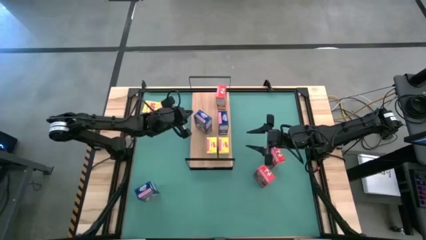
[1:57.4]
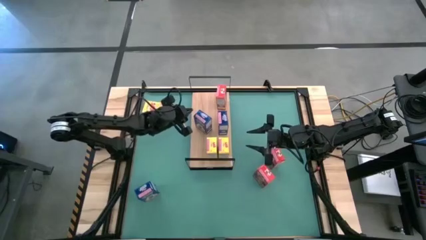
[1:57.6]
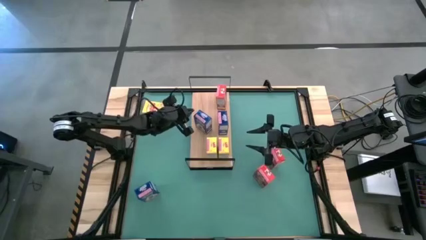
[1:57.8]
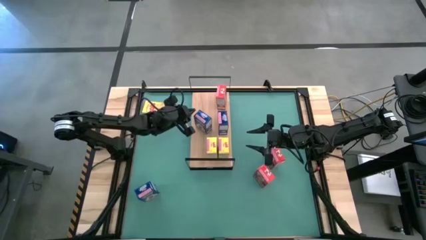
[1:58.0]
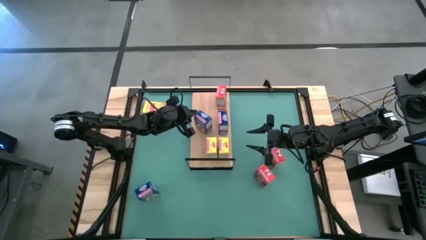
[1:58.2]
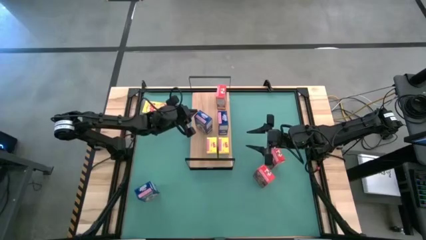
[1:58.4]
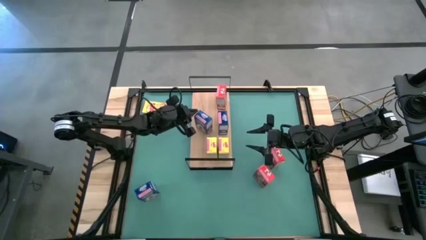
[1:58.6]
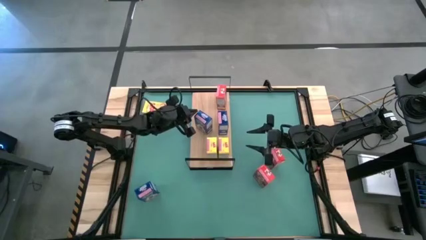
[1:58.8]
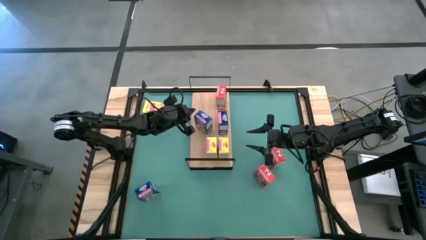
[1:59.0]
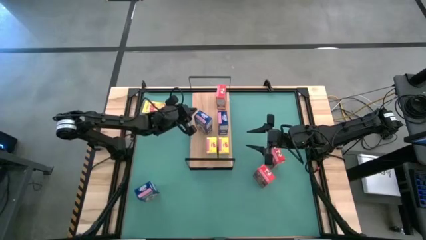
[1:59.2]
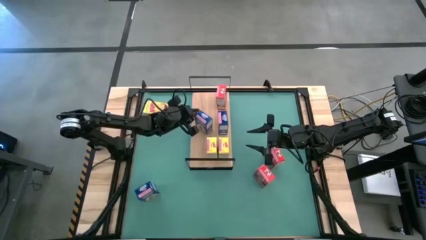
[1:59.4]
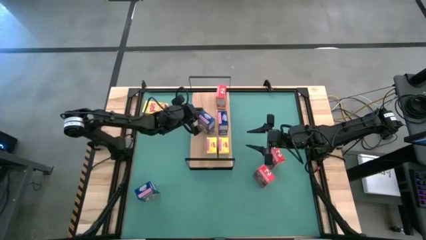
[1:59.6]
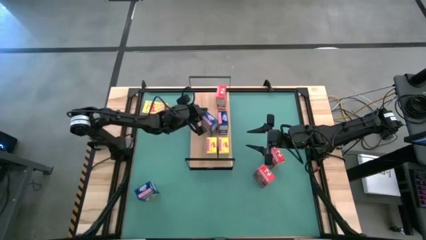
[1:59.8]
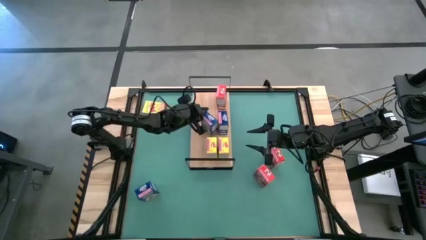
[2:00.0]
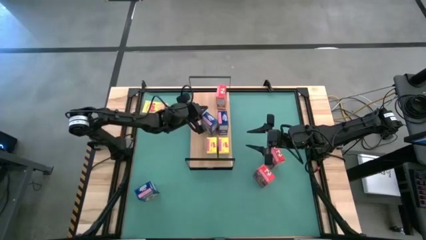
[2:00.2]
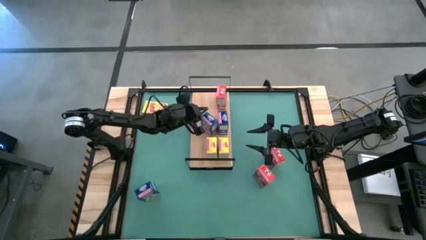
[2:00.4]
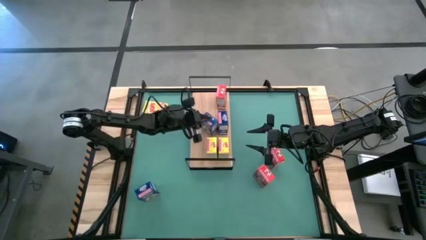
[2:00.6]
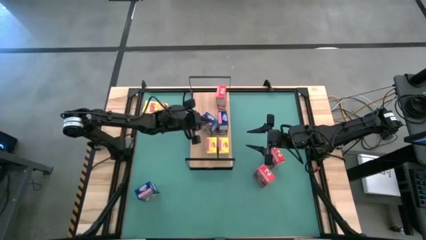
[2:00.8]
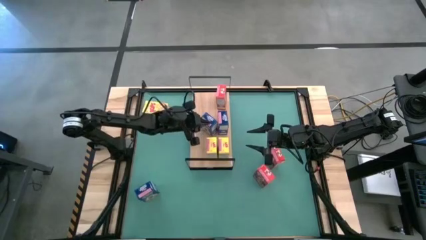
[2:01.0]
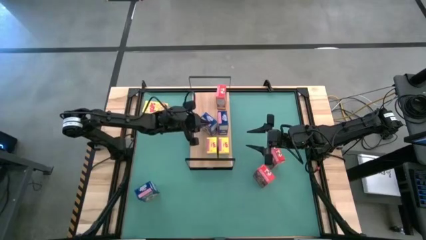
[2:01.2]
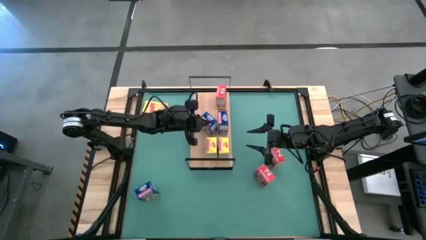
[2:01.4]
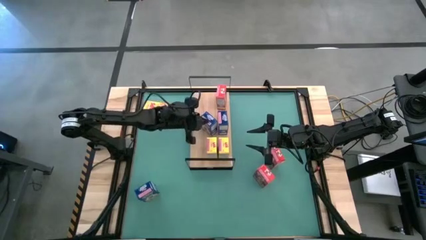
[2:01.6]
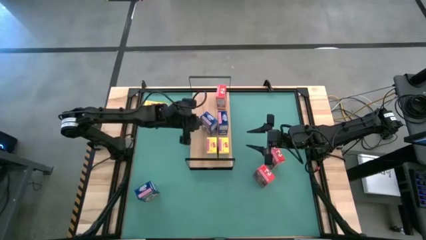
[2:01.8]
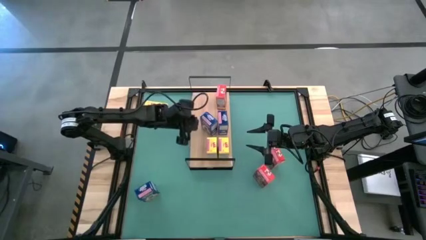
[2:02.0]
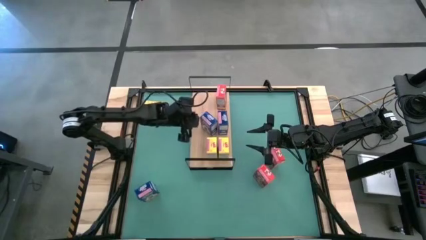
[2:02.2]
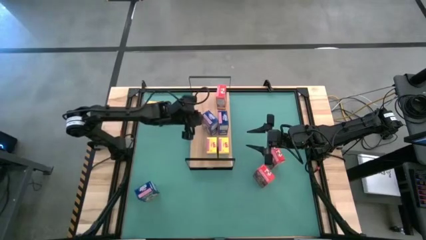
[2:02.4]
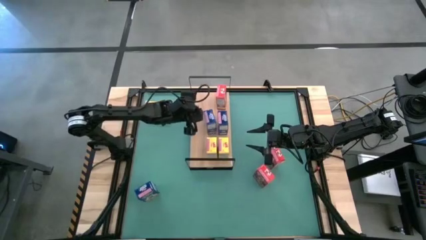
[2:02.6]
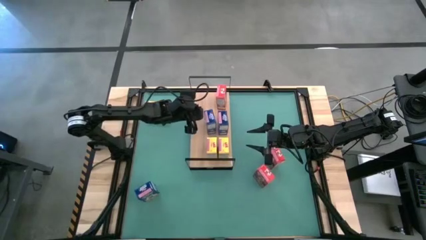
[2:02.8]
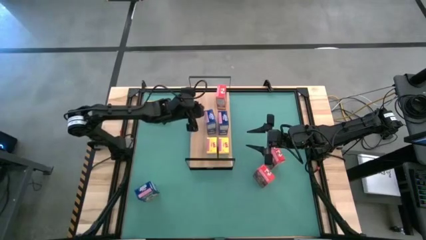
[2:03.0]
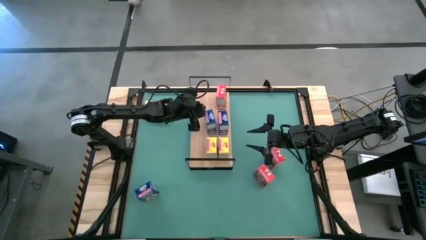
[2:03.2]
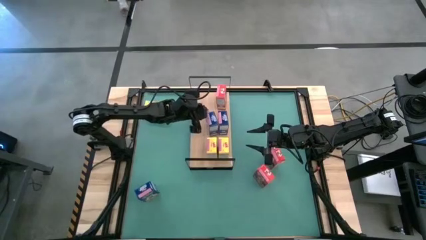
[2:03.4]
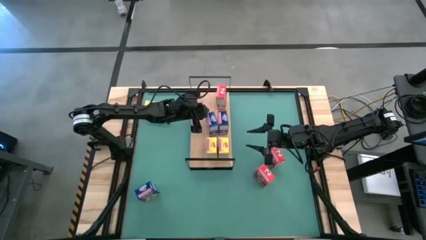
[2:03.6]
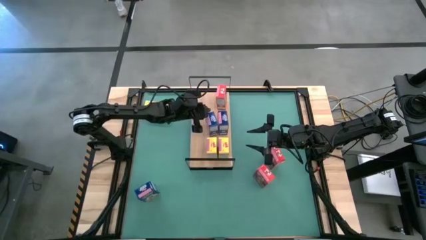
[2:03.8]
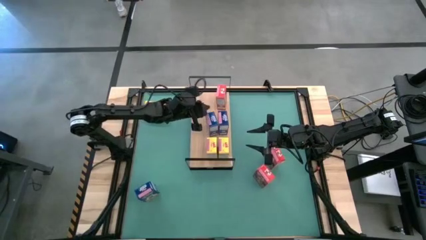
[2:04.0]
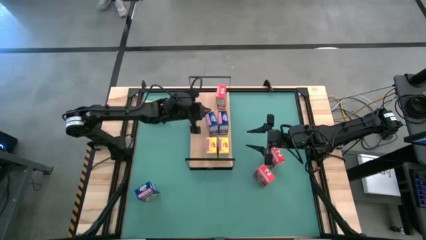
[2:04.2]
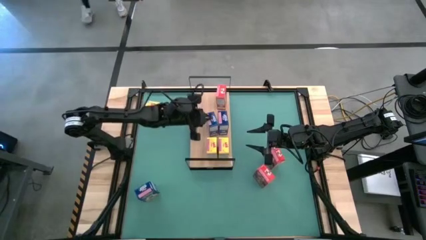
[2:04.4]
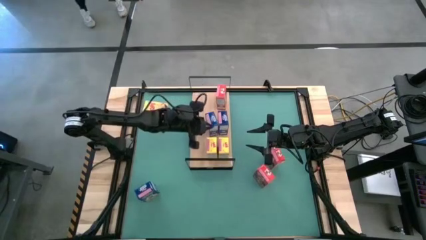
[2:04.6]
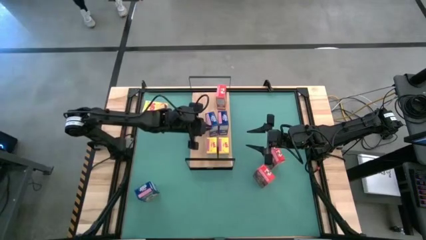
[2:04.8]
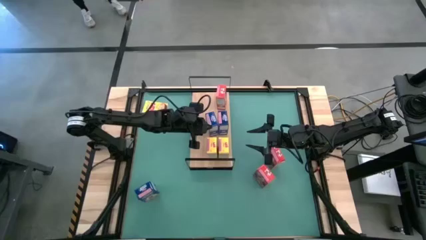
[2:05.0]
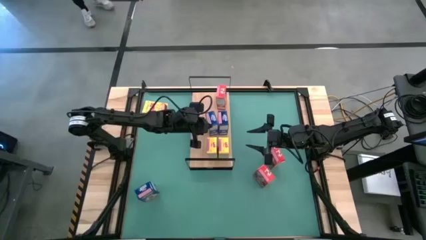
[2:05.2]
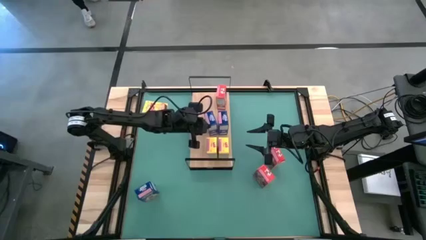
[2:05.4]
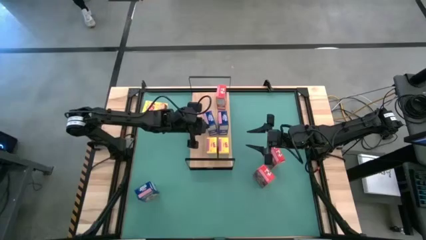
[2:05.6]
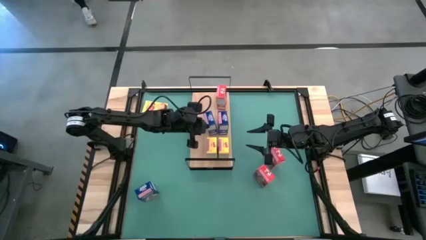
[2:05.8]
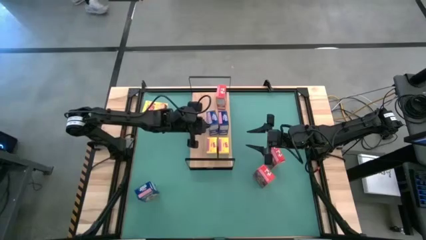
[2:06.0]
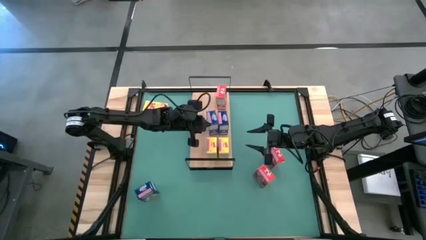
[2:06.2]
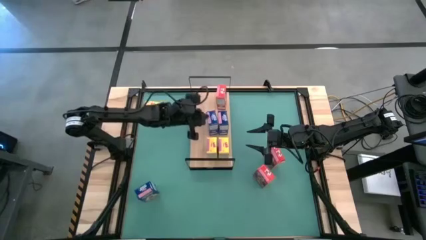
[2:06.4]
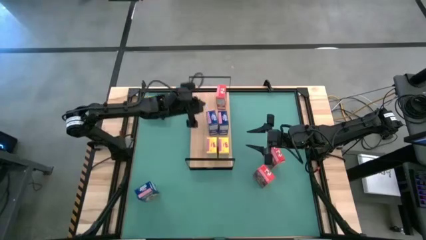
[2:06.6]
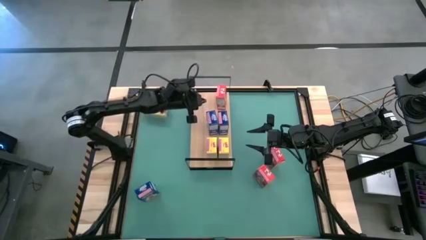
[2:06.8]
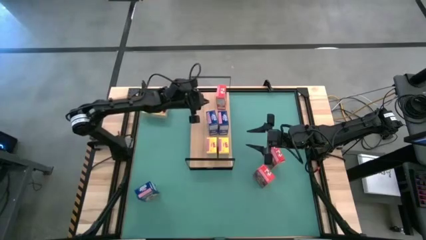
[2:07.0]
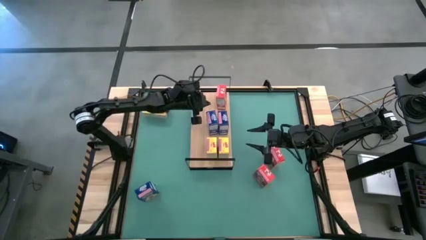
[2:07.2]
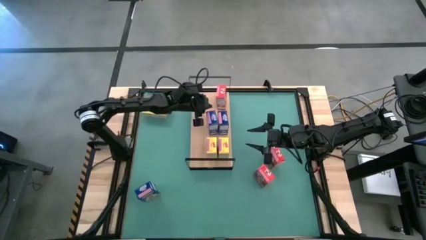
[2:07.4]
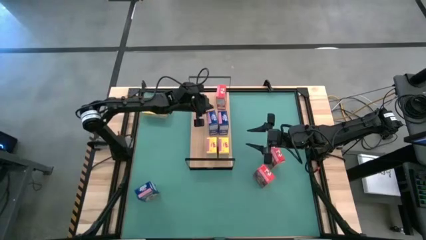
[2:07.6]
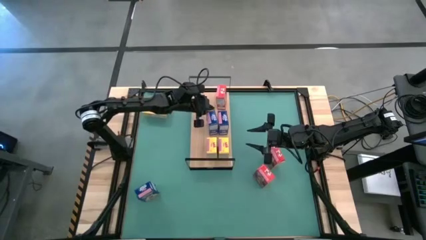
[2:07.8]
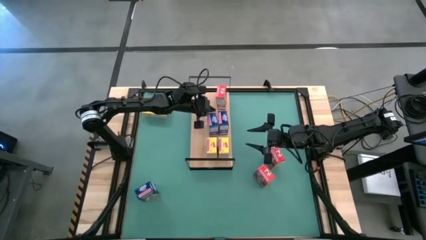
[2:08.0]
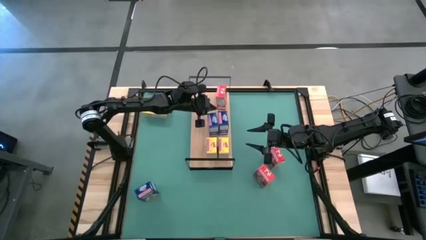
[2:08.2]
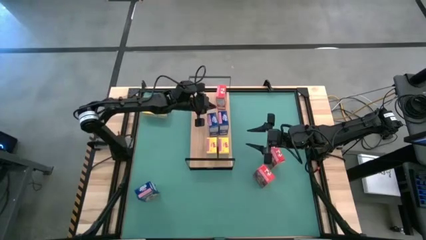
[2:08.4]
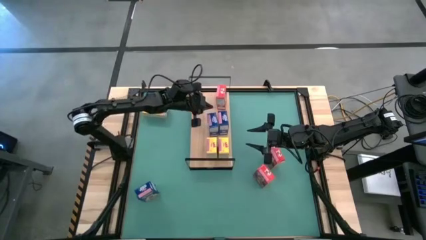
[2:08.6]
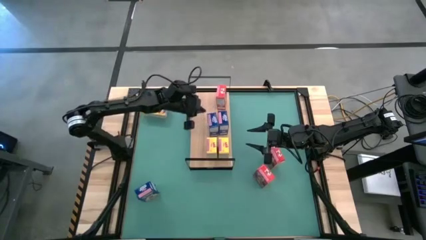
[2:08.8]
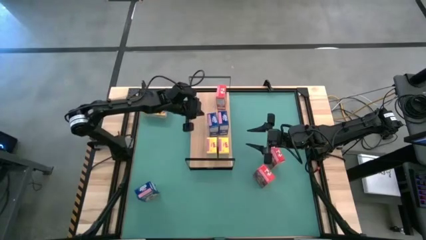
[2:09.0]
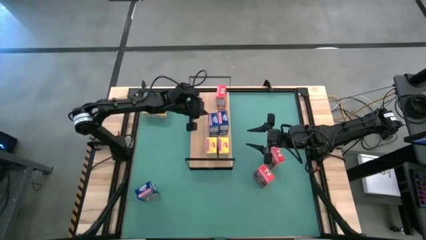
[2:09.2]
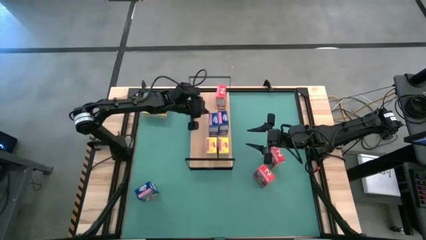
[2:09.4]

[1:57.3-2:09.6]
Task: Stack cereal on shelf
Put the top blue cereal box on the shelf aligned with the other blue cereal box

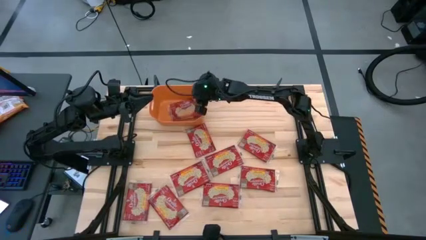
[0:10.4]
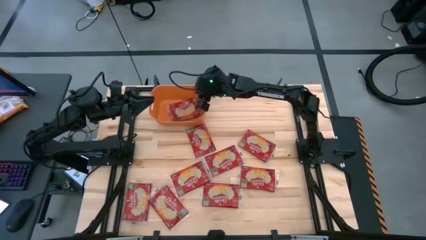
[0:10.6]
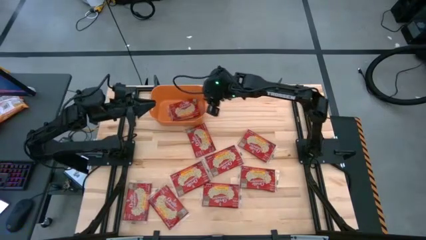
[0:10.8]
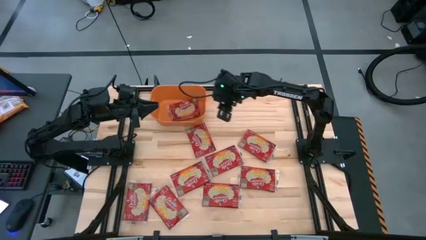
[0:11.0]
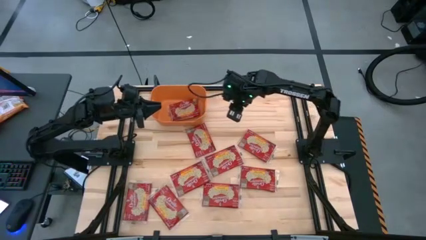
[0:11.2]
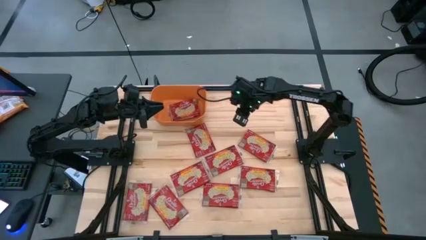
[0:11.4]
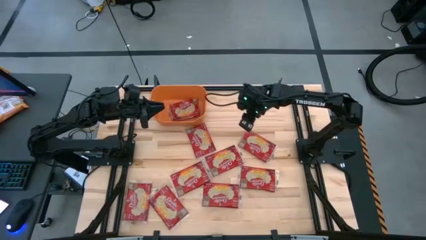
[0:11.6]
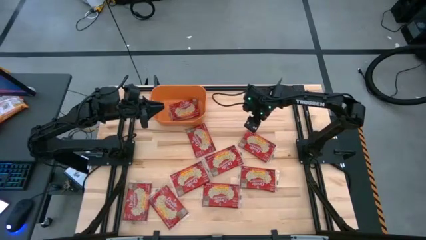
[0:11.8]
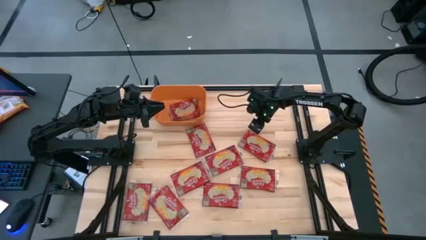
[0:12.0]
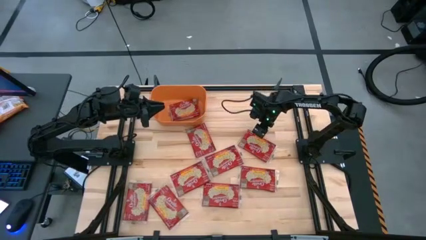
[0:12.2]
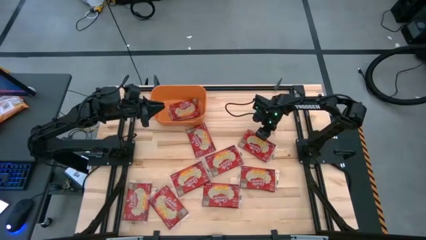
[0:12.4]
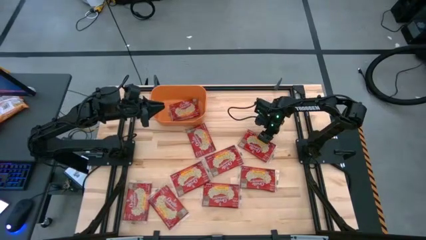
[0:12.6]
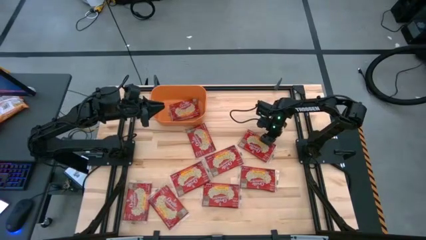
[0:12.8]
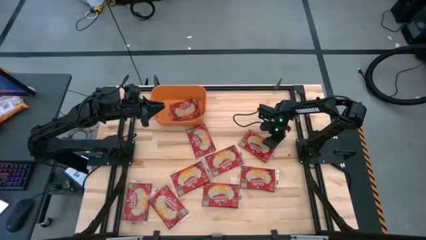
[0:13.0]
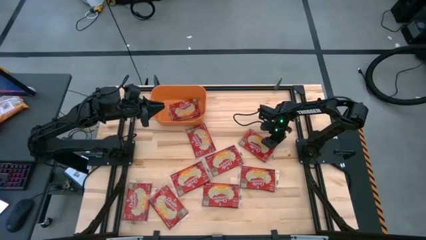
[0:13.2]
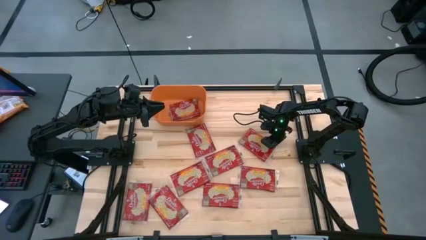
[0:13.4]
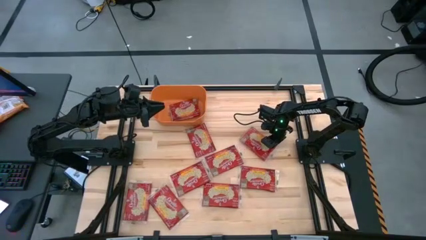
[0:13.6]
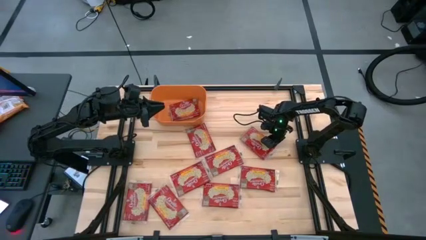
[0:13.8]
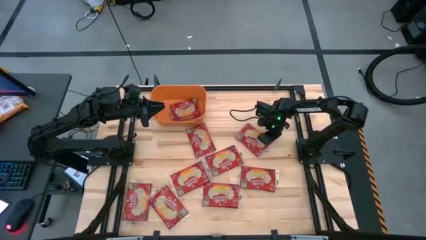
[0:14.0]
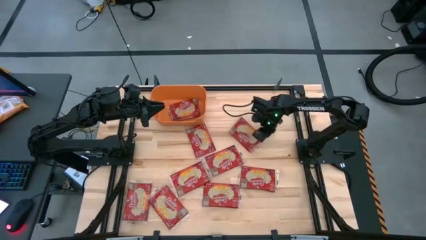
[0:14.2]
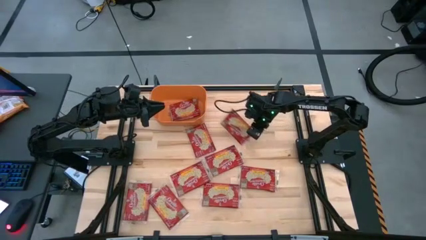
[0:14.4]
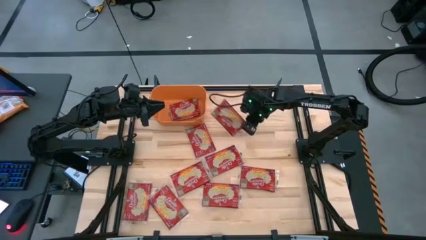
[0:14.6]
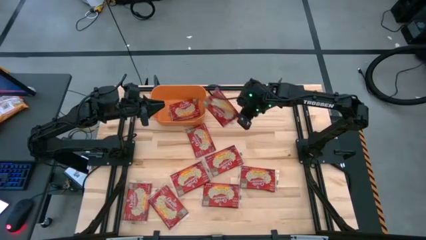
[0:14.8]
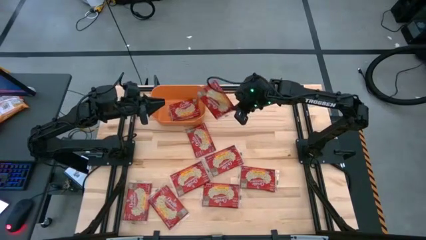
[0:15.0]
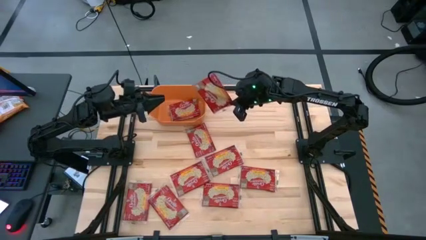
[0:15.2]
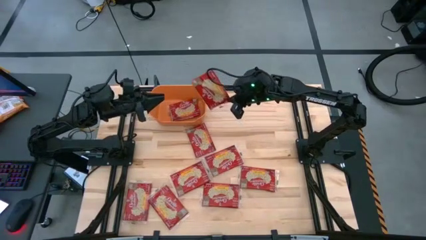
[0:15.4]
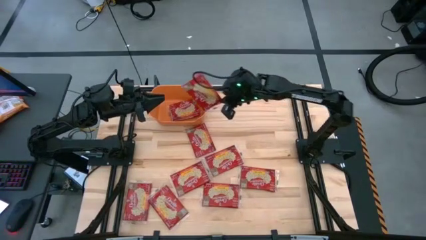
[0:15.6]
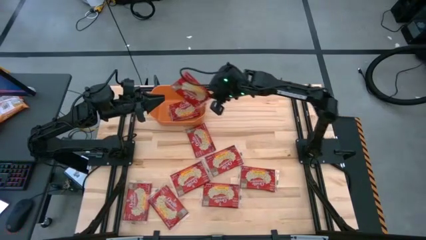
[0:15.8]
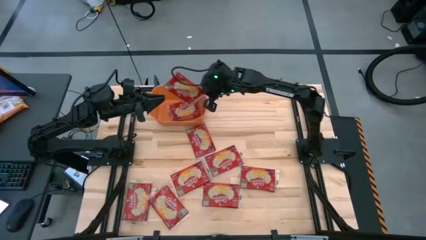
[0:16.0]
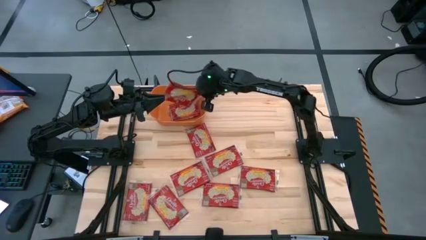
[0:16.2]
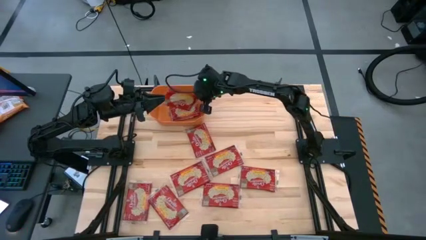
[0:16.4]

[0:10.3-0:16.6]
Task: Sort popcorn bags into baskets
Put the red popcorn bag into the orange bin
